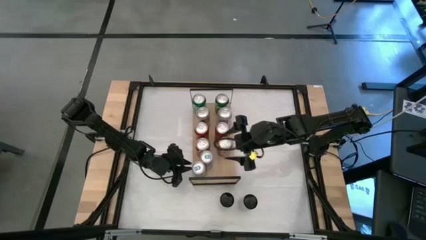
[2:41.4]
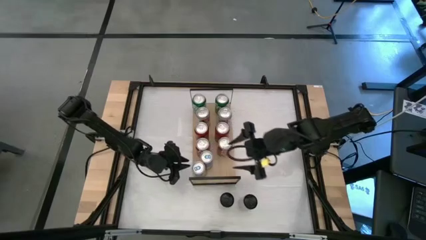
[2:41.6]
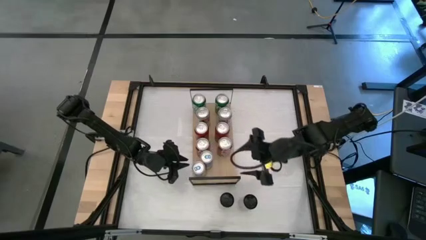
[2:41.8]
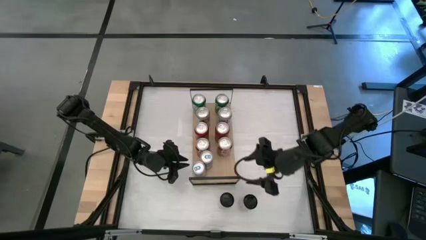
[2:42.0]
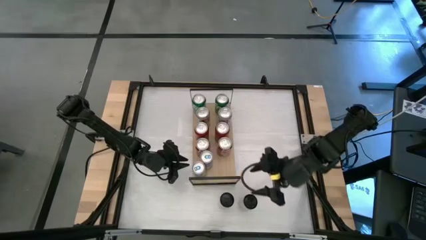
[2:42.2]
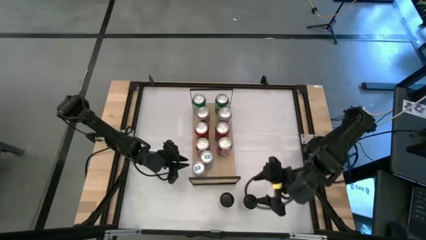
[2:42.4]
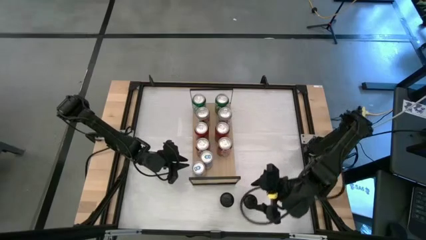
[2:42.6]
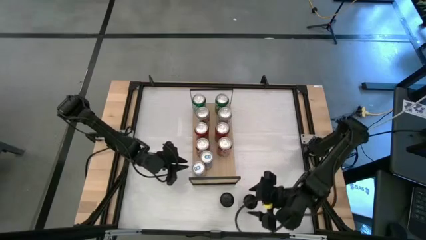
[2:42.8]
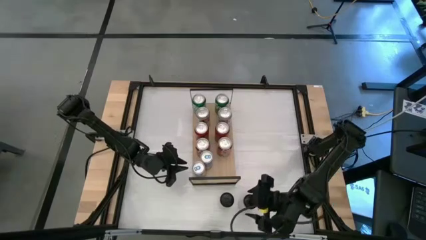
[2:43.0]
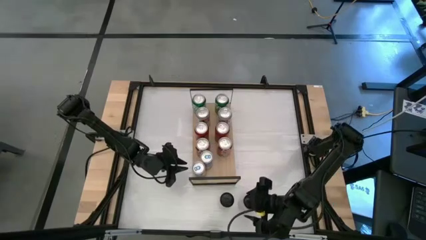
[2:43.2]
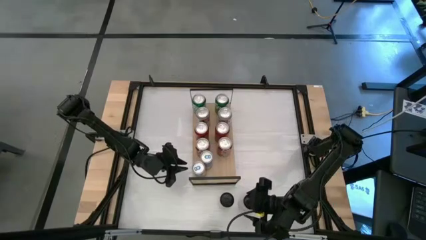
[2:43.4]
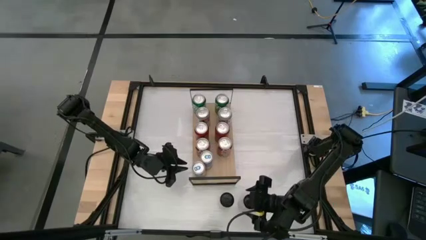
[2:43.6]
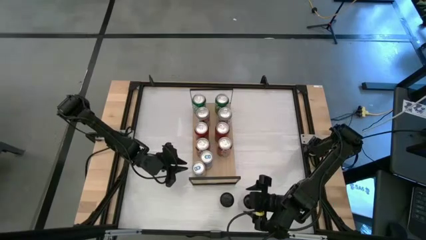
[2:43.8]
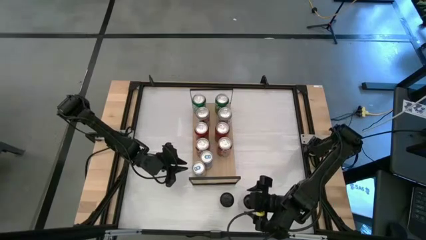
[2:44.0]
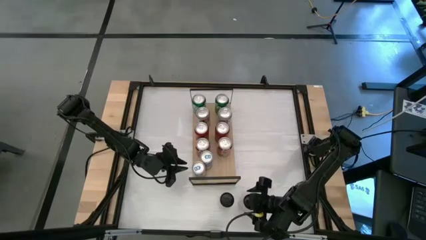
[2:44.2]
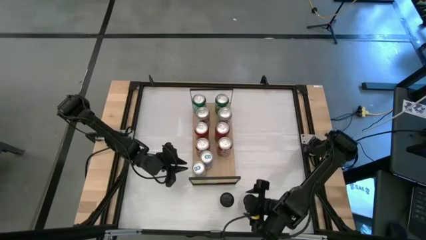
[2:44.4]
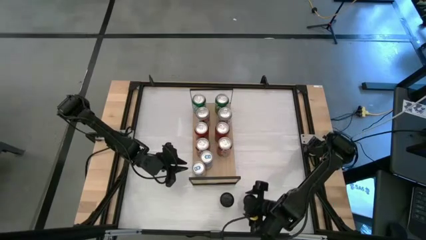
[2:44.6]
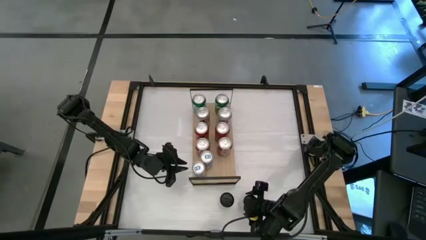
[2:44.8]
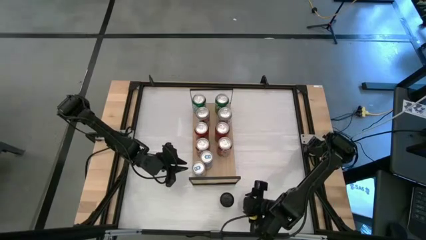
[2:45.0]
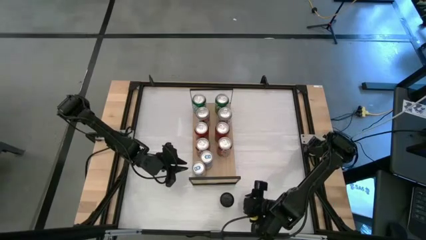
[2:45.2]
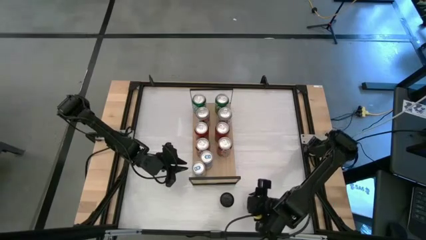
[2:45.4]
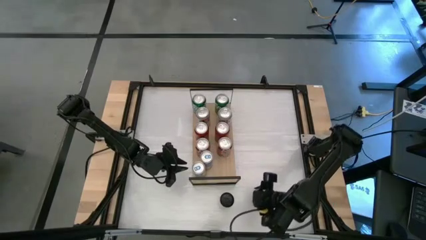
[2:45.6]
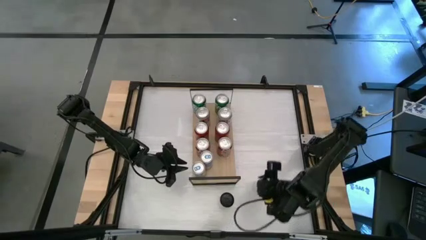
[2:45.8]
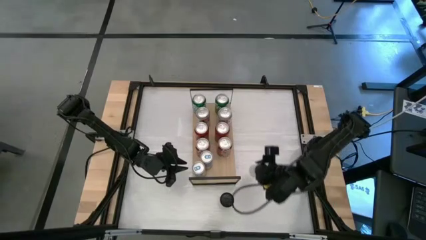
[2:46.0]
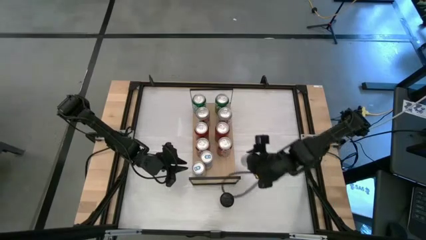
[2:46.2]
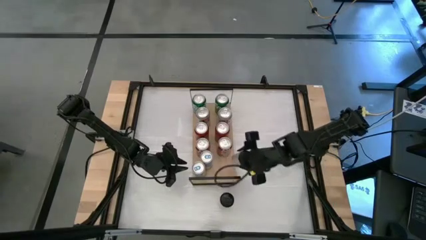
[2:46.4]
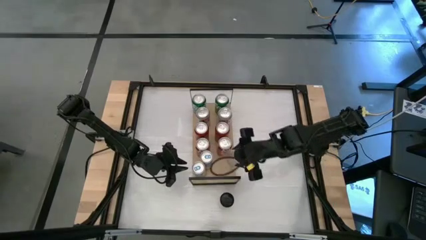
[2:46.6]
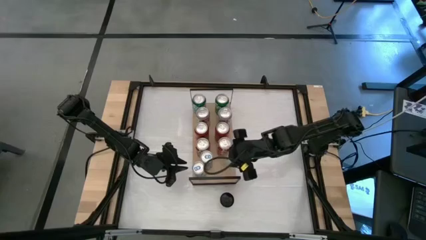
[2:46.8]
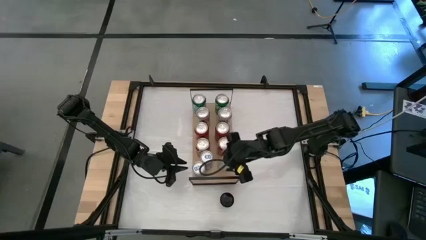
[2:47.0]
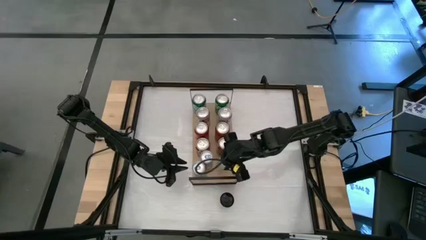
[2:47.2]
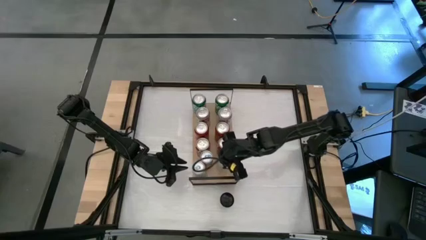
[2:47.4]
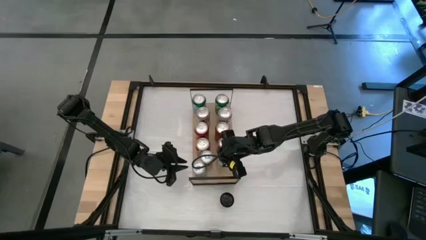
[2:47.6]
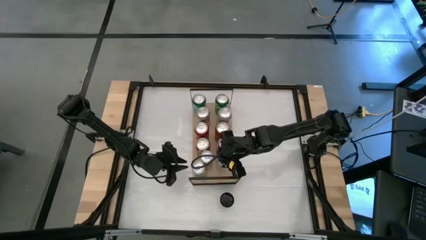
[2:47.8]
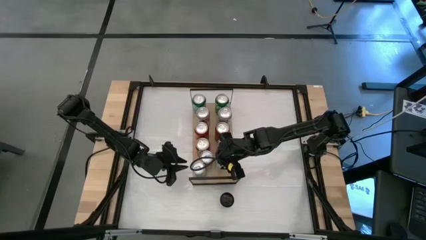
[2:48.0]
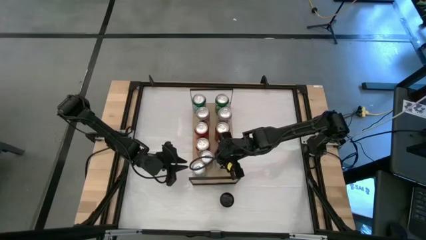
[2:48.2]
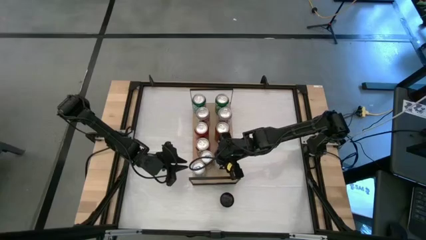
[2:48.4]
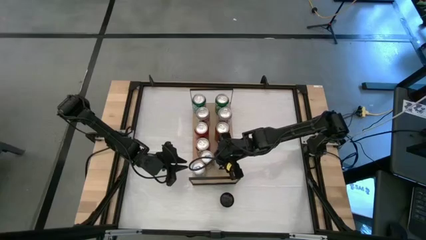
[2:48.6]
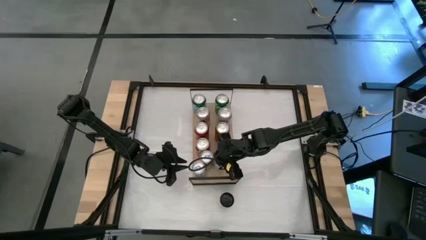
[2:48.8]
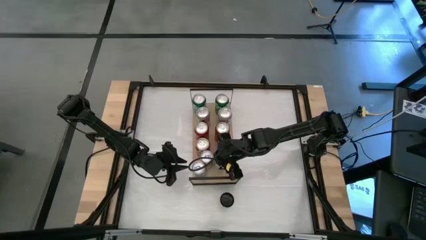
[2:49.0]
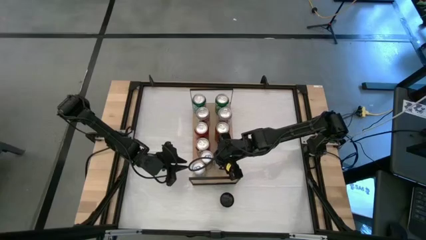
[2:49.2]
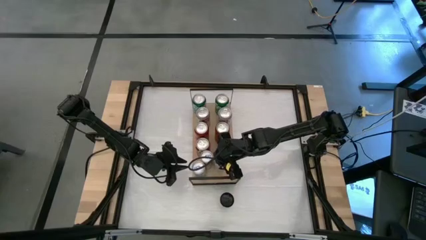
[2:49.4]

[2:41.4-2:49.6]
Task: Place canned beverage on shelf
Put the right yellow soda can on the shelf aligned with the other blue soda can

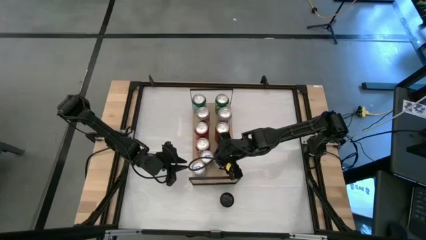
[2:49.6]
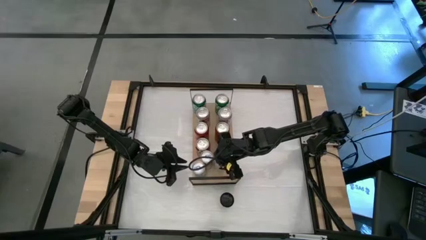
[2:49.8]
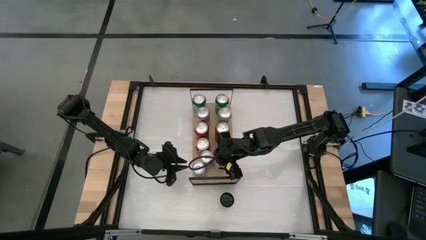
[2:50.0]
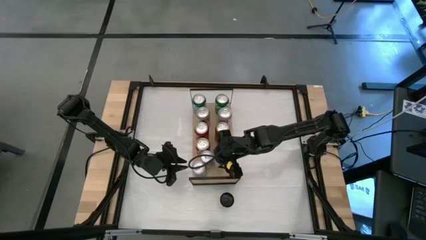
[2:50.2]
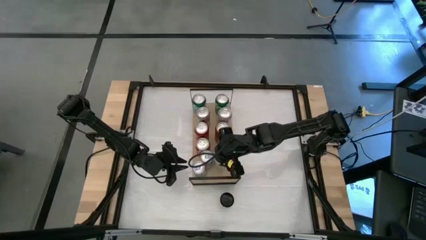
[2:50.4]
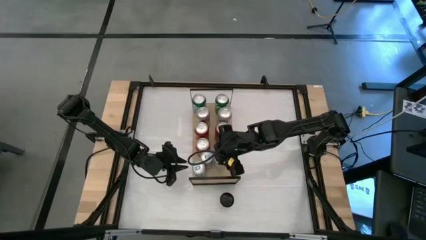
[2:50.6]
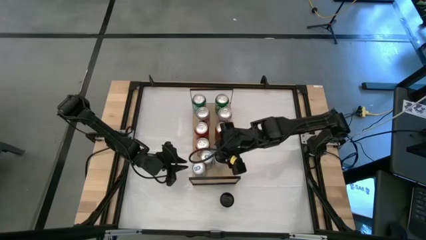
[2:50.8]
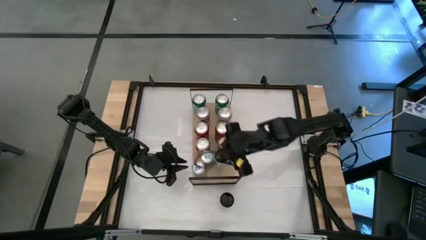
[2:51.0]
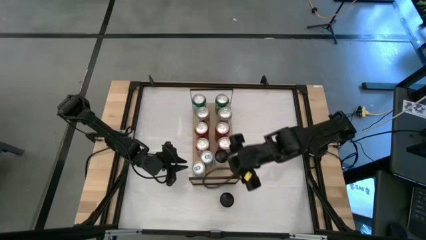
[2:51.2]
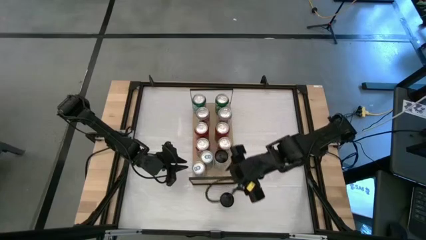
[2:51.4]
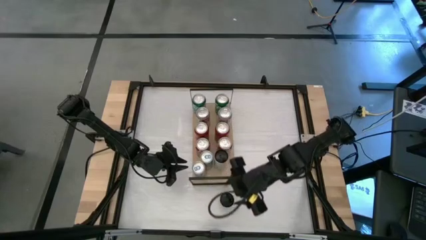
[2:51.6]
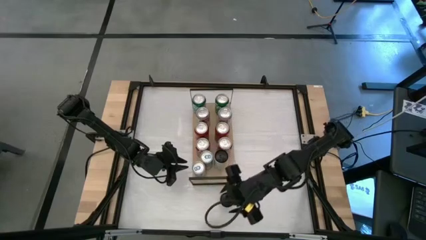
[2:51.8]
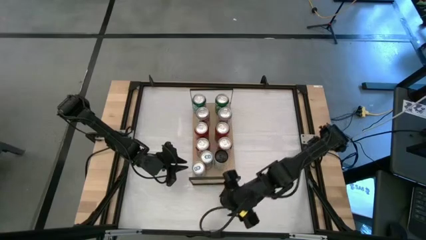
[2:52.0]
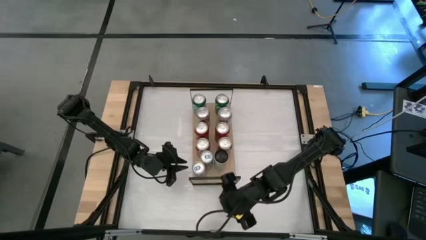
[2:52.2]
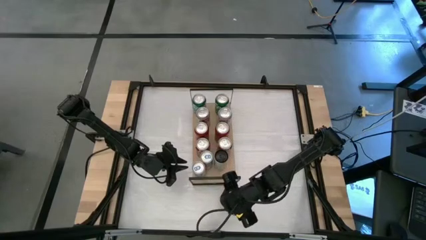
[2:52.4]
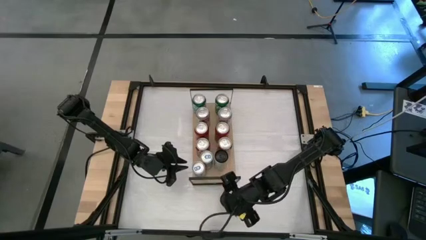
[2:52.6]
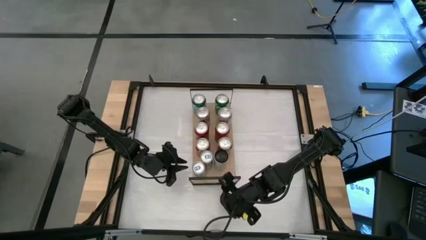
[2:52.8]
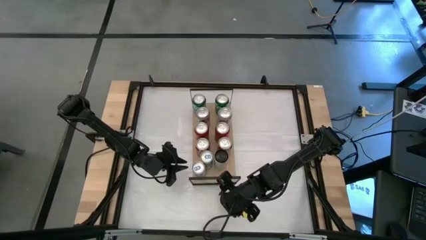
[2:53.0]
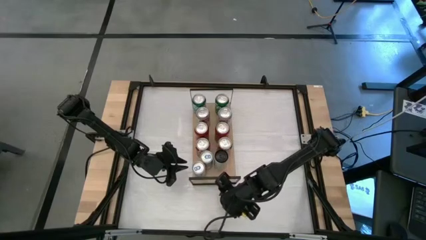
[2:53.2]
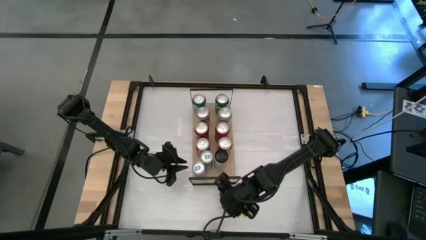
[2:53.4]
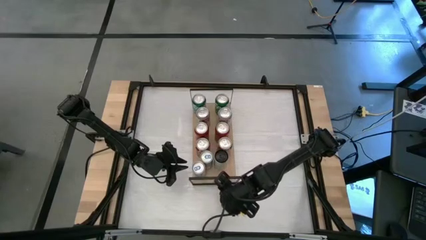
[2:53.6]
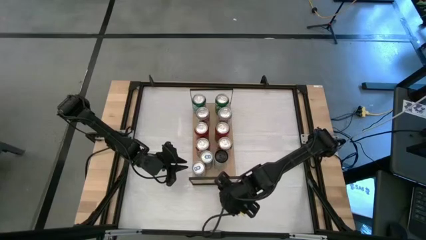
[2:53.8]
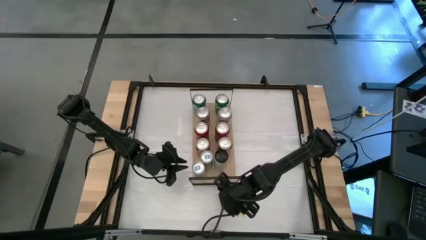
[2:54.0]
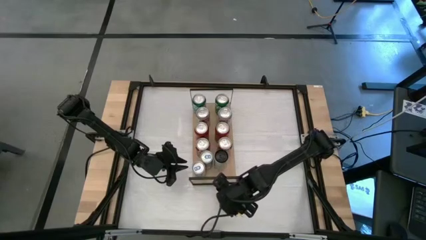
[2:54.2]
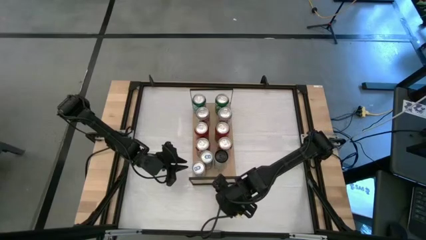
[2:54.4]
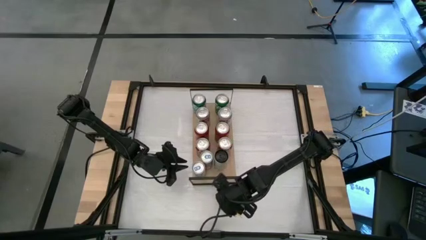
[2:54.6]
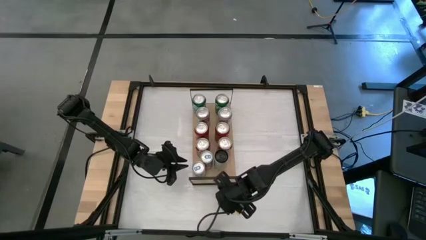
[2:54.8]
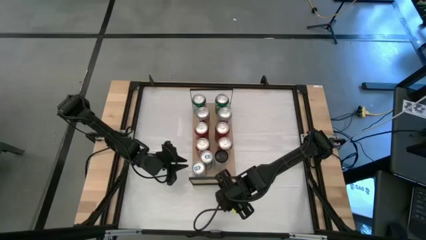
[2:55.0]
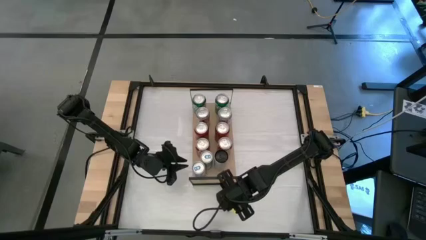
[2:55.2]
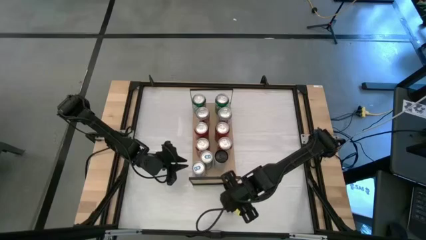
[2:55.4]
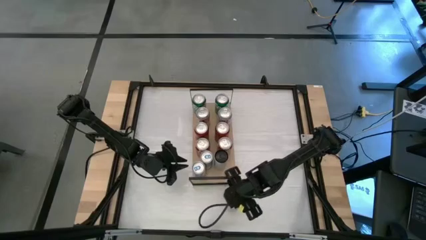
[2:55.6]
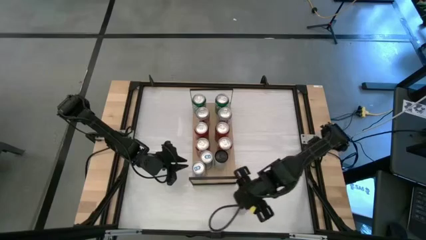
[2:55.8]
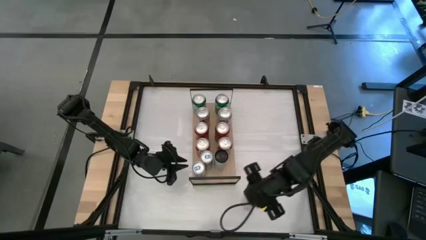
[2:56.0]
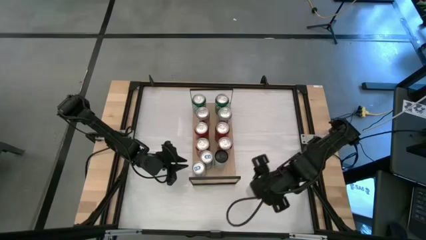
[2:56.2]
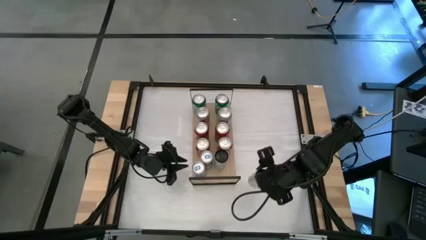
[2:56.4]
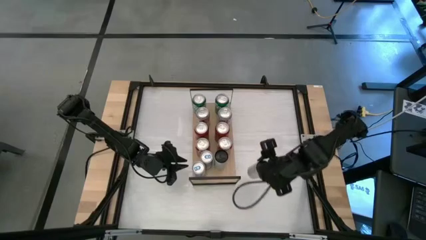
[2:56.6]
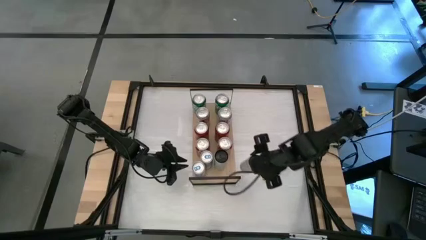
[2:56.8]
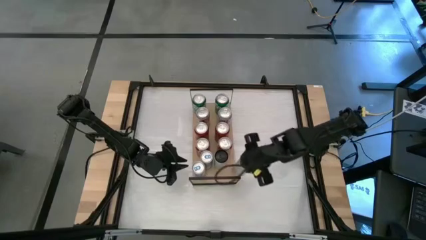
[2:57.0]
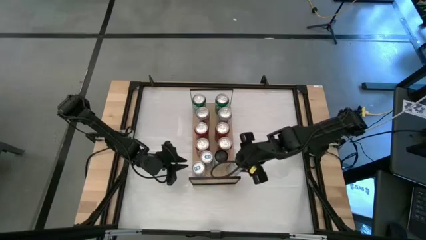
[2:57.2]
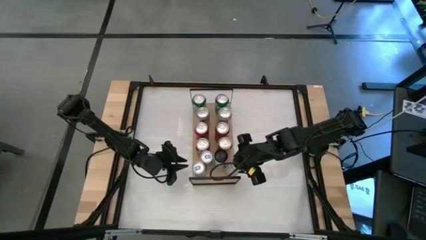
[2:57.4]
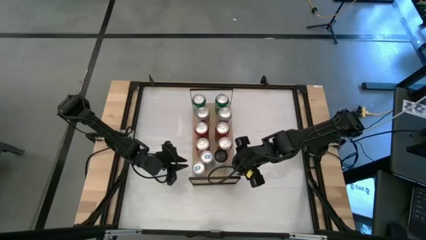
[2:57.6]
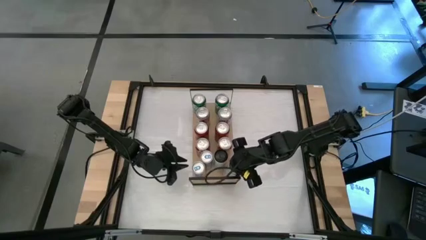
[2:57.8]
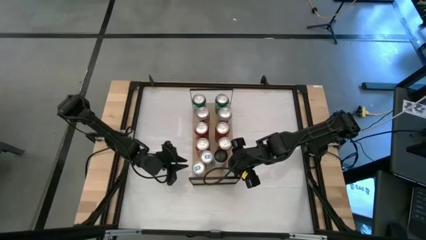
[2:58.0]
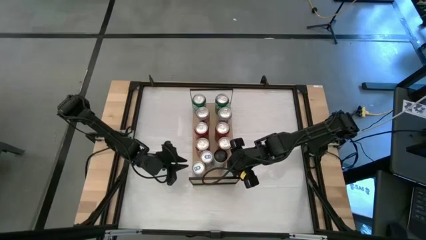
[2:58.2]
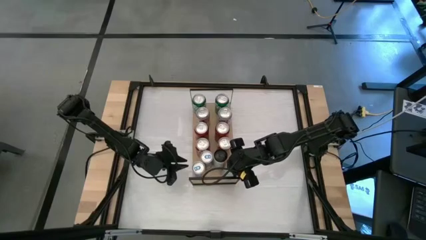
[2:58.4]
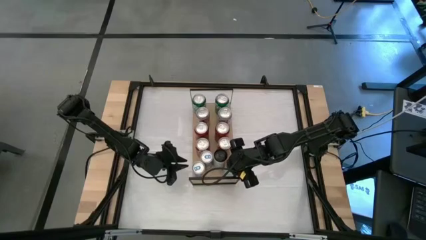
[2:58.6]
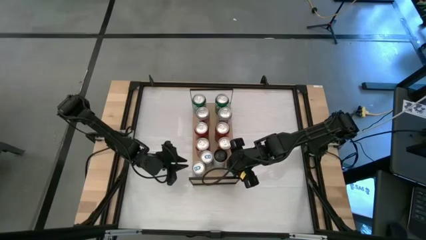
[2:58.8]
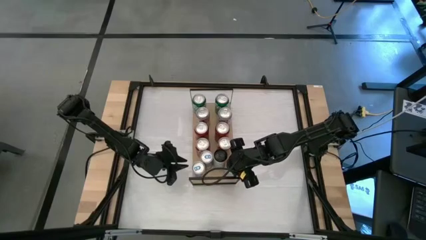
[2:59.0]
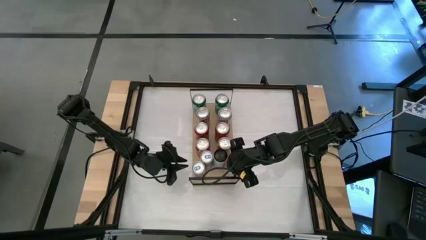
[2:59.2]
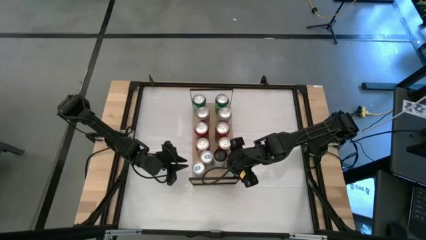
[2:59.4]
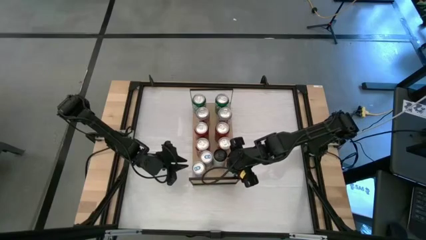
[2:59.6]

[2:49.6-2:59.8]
Put the yellow soda can on the shelf aligned with the other blue soda can
